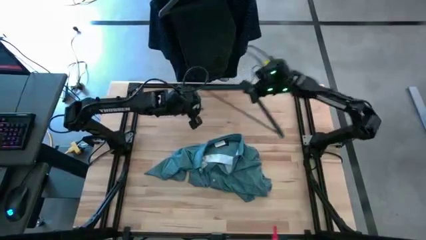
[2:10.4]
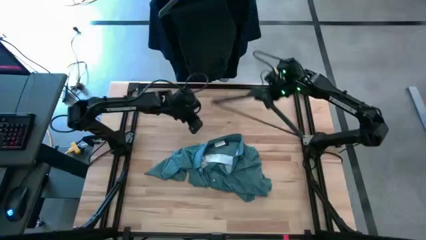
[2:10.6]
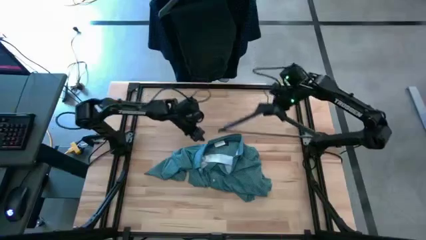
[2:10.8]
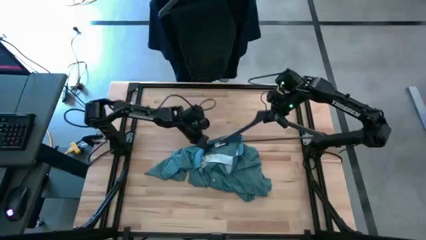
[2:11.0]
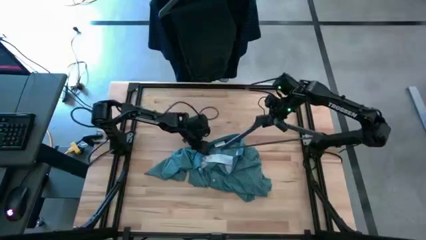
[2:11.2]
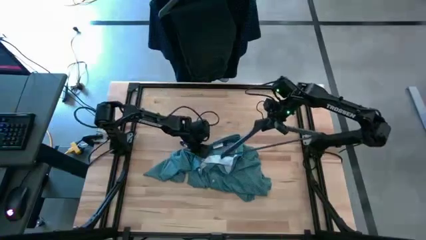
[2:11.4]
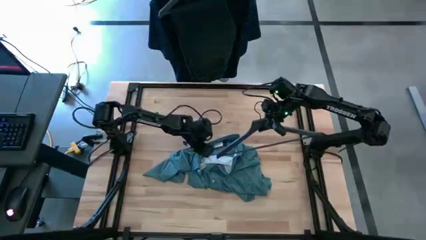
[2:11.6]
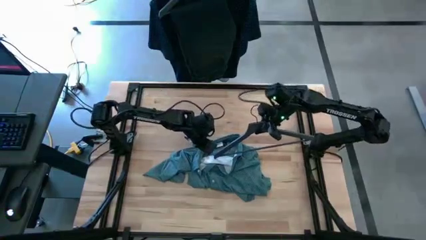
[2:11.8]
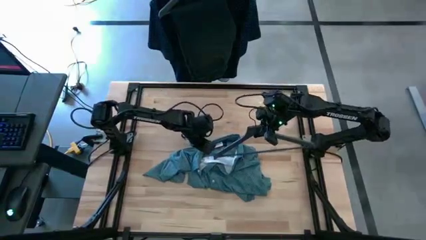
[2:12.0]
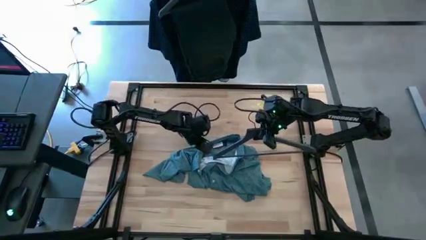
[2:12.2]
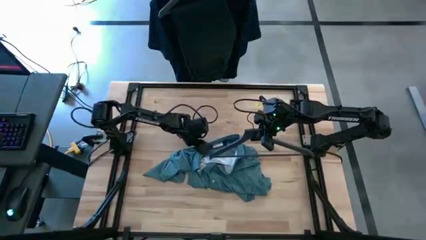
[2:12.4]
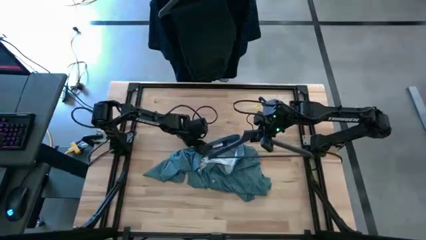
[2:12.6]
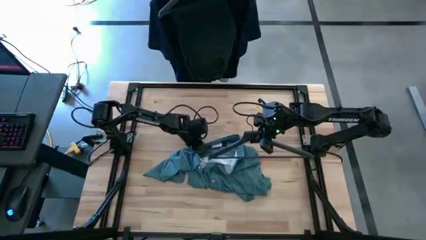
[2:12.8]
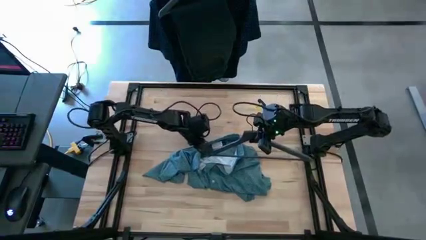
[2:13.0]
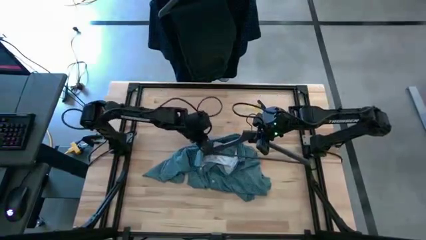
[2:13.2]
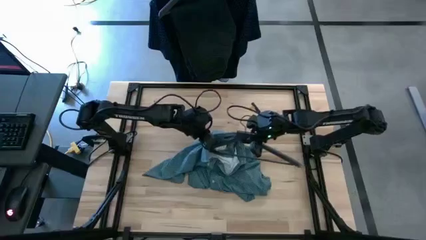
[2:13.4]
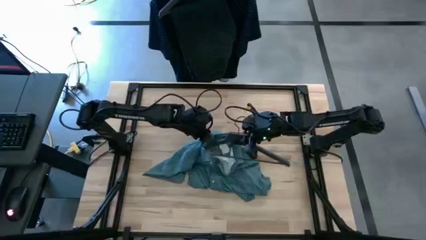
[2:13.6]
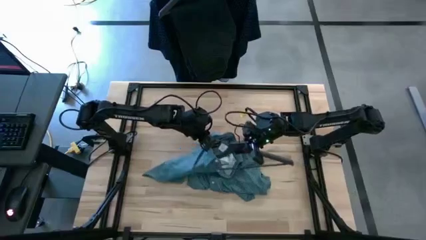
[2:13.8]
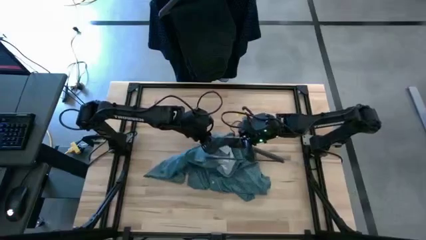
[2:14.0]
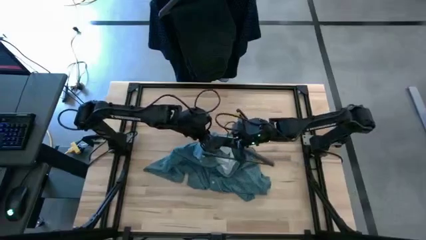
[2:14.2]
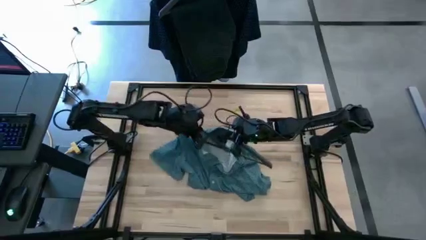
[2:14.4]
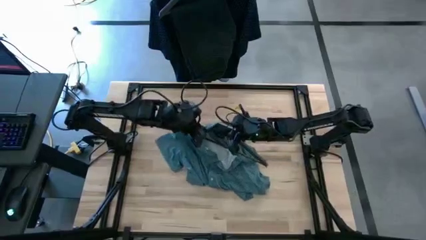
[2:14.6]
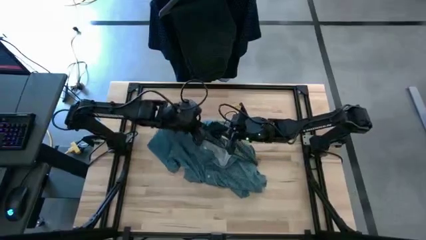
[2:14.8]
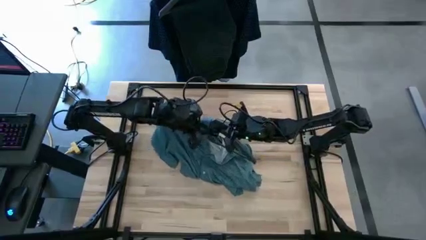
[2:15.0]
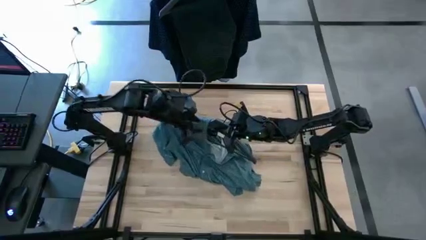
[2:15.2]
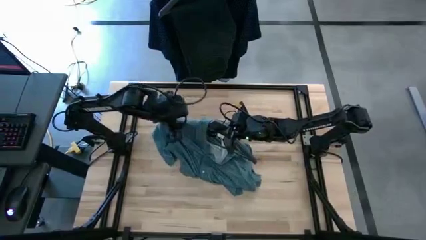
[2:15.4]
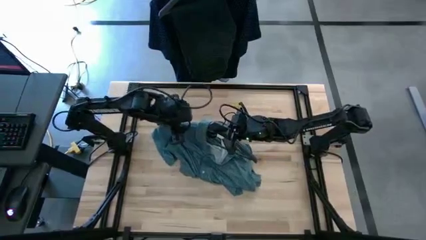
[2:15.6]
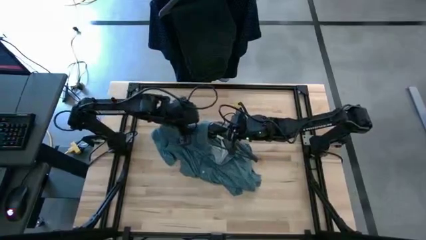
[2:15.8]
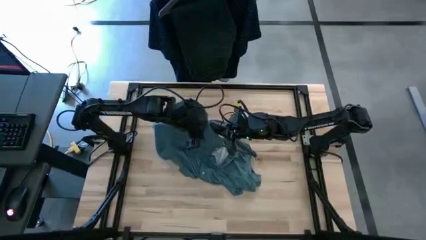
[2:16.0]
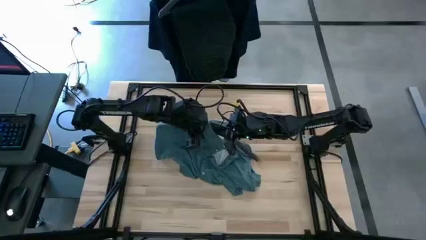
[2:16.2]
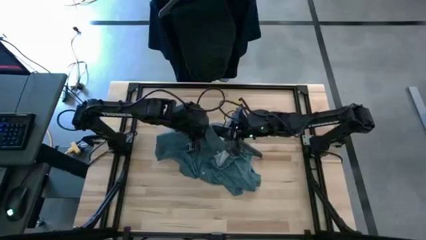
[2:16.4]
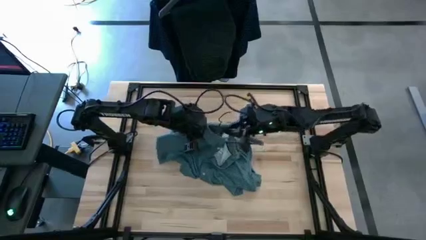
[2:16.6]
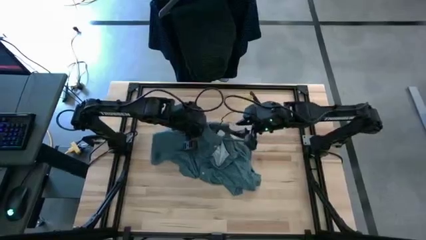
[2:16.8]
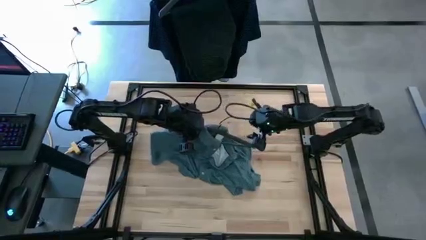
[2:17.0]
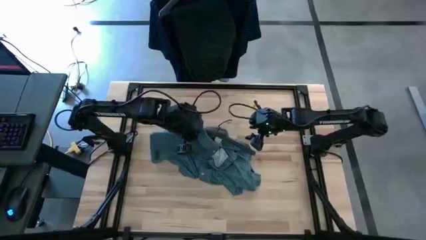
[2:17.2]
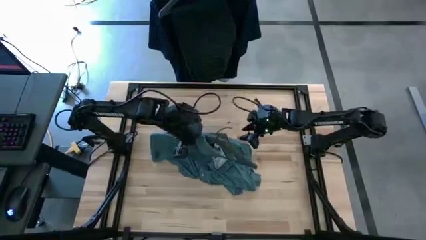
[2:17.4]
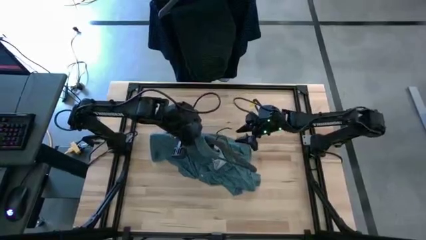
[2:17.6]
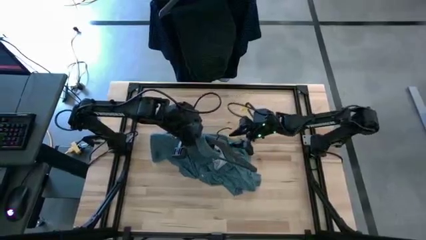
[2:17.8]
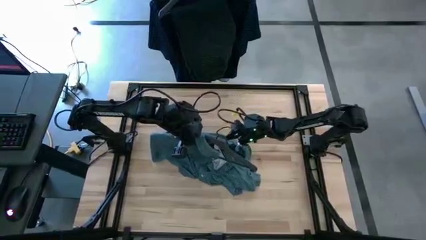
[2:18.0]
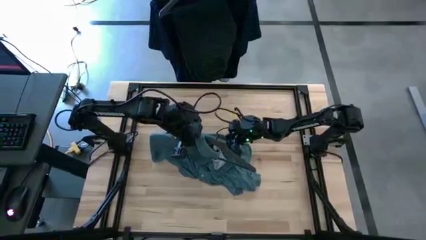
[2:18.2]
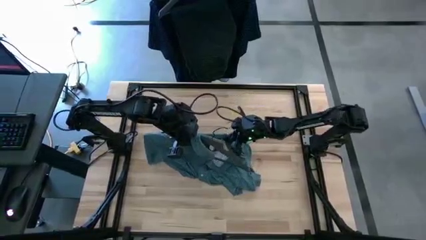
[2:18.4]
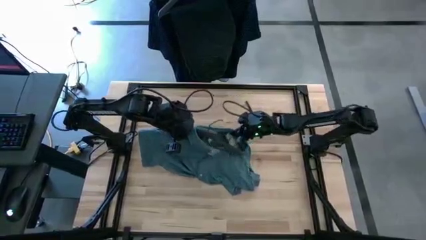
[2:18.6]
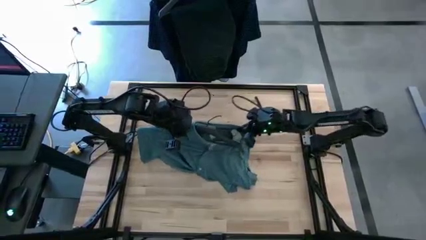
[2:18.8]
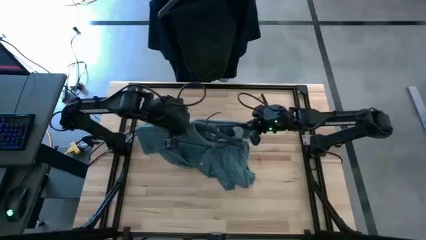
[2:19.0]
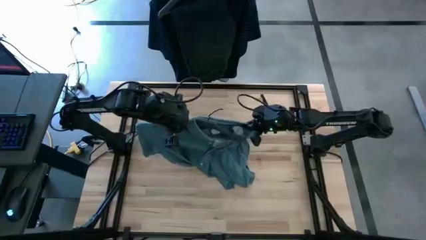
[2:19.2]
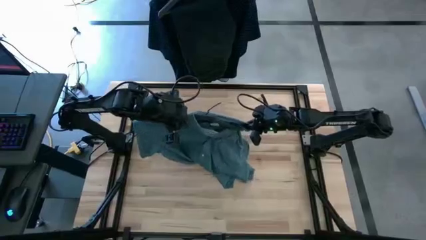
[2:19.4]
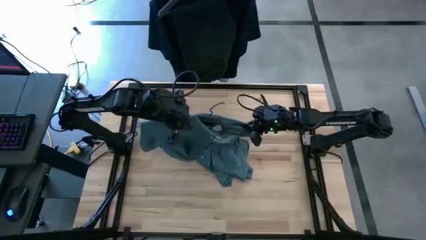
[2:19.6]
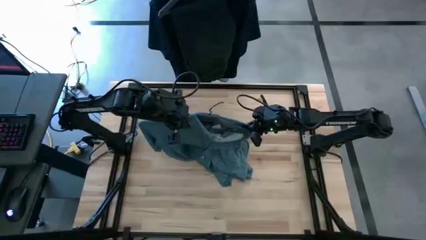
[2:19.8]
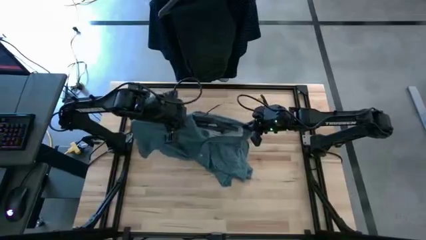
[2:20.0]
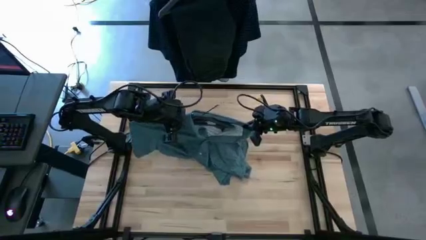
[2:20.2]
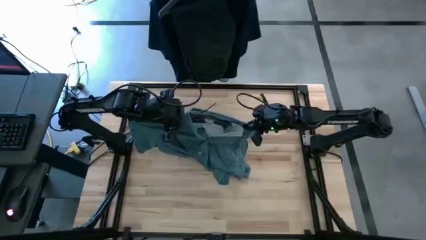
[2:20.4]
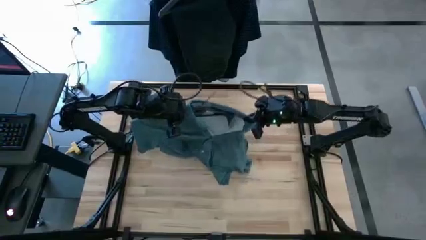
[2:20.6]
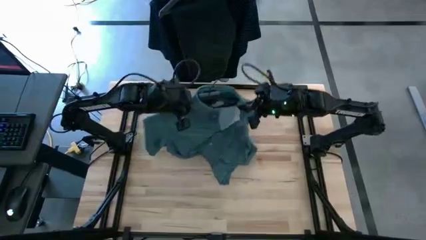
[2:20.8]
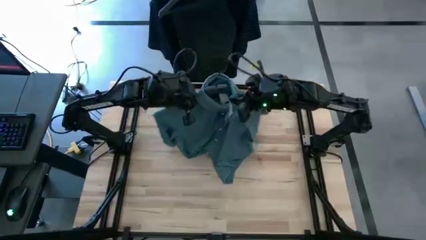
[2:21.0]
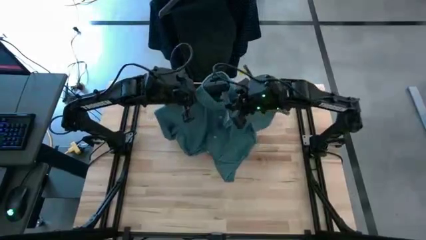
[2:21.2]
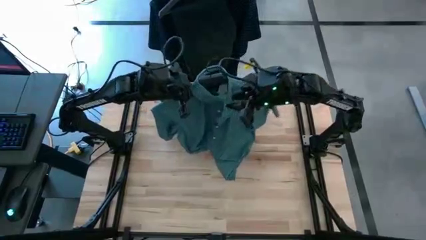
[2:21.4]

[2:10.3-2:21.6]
Task: Hang clothes
Insert the hanger into the light blue hanger shirt
